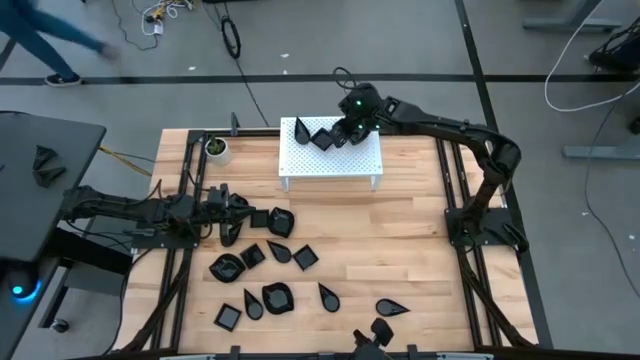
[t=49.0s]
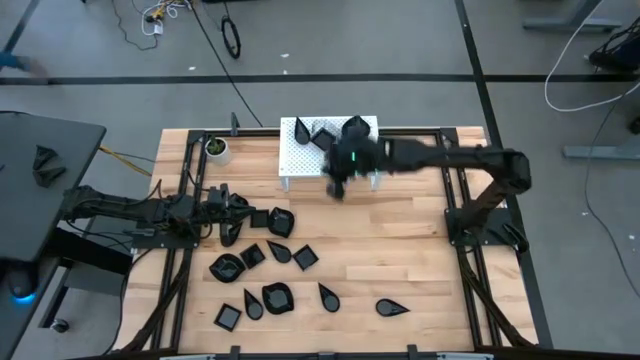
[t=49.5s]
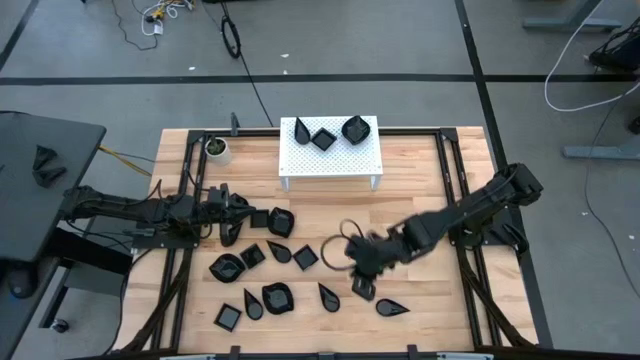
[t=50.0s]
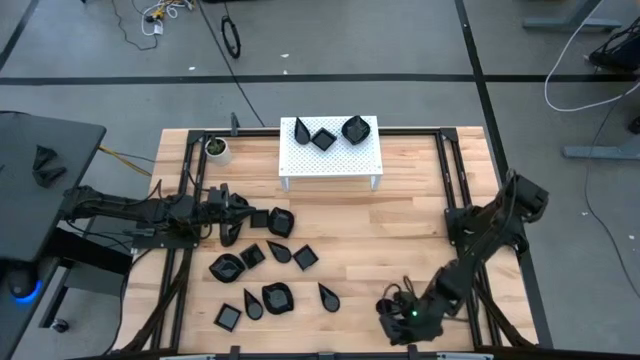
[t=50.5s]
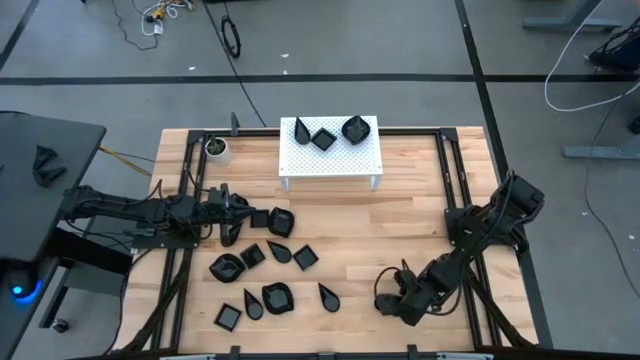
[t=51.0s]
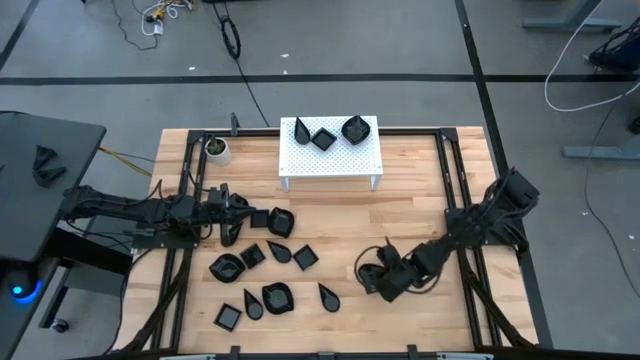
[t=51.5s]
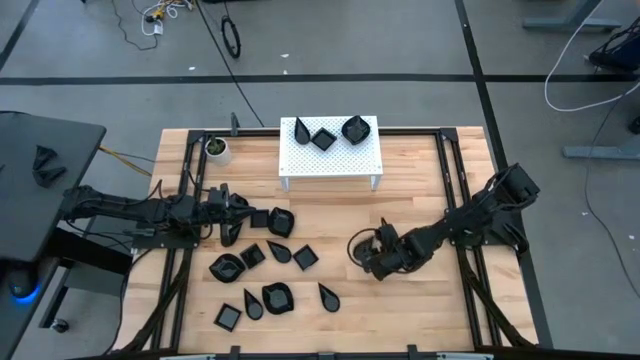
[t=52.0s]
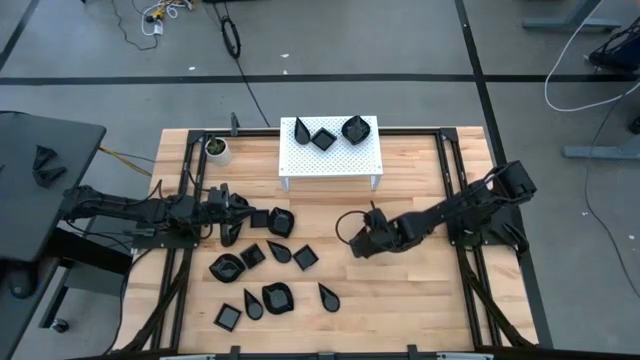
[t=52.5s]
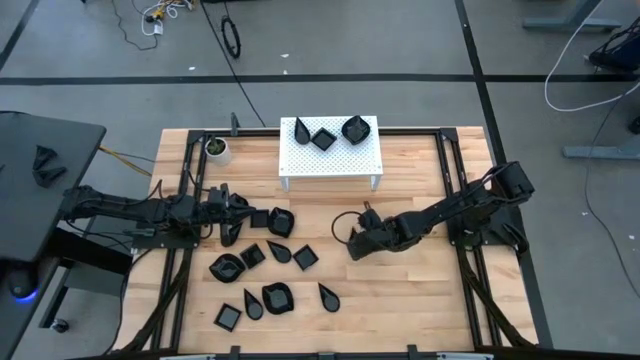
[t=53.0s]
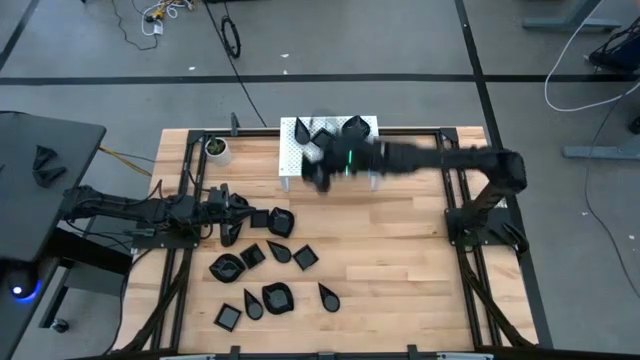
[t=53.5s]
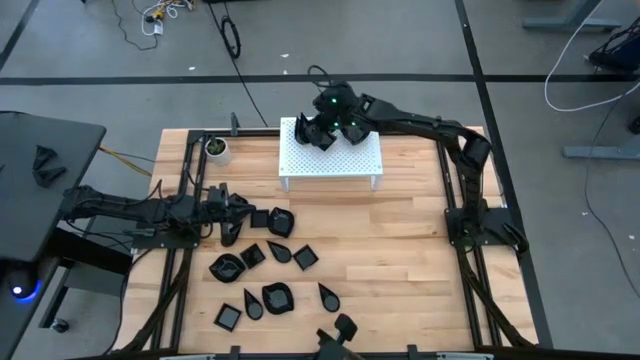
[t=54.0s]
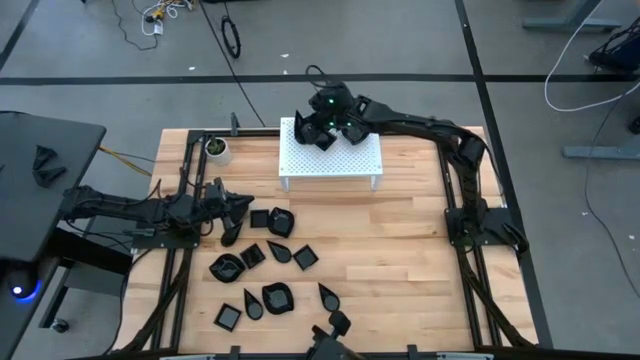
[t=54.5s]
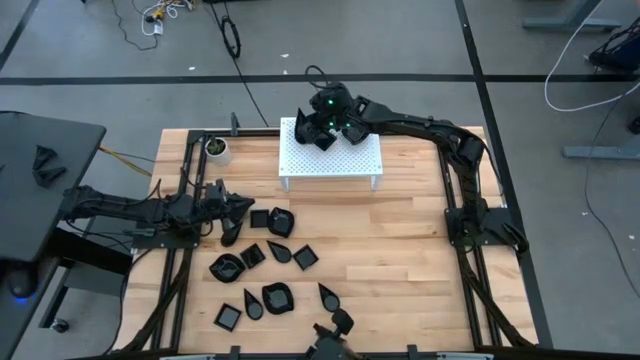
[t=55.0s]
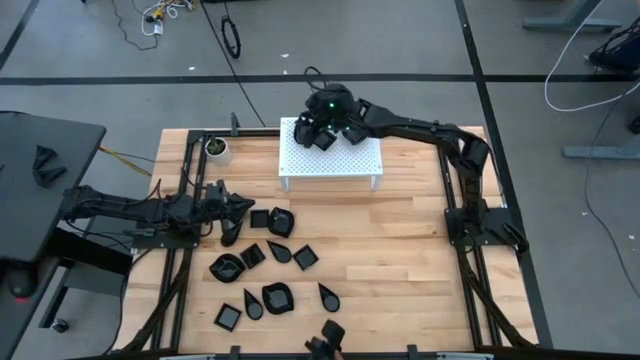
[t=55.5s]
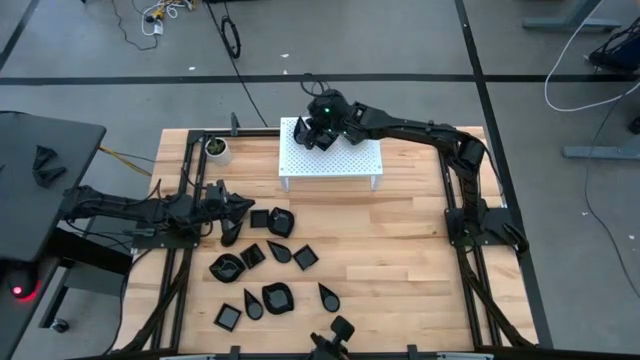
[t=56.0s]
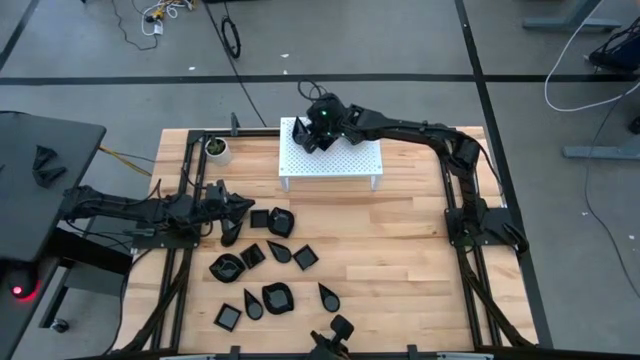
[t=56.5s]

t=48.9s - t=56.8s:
Task: Pick & Place Mini shaped plates
Stack the black drop-shaped plate on top of the other black drop-shaped plate on the shelf

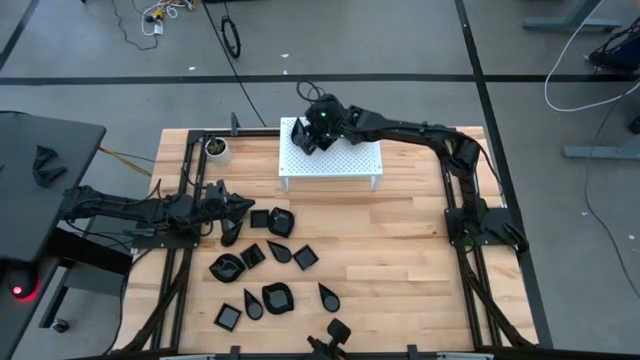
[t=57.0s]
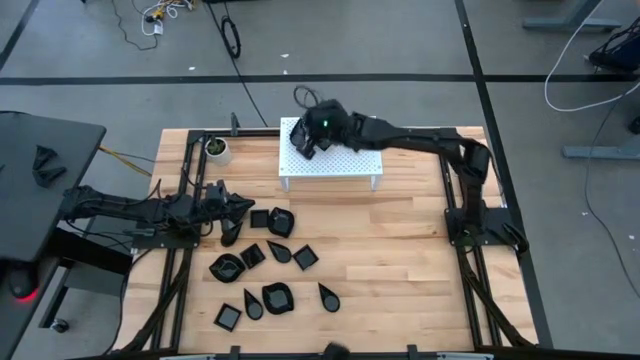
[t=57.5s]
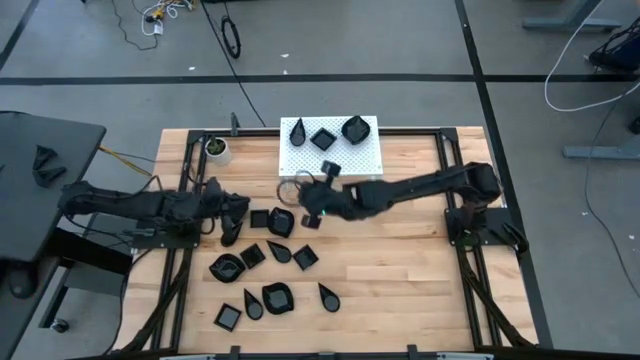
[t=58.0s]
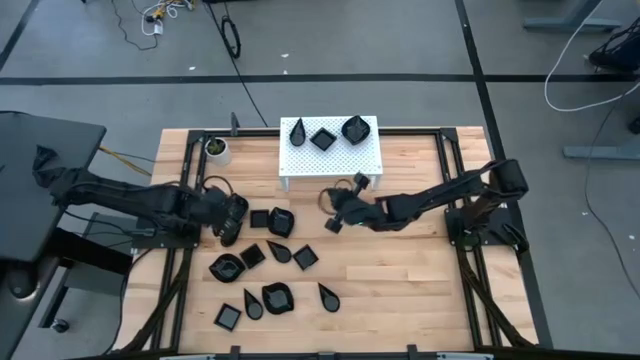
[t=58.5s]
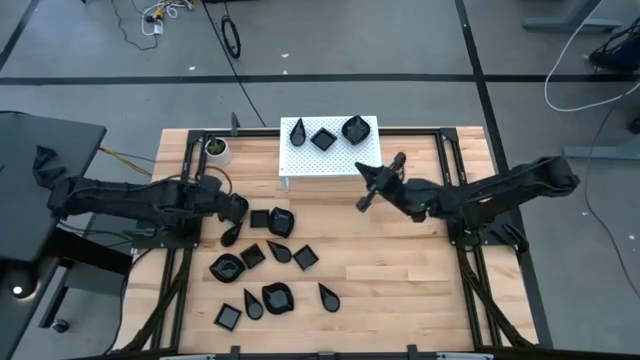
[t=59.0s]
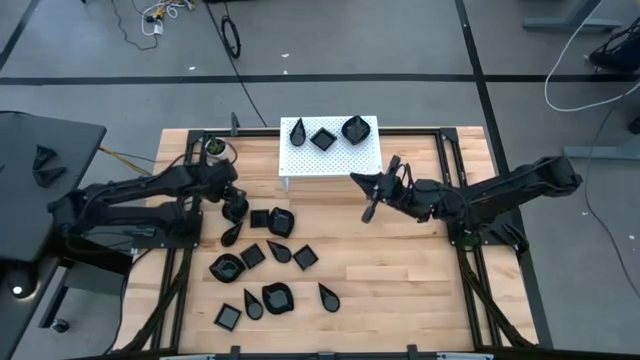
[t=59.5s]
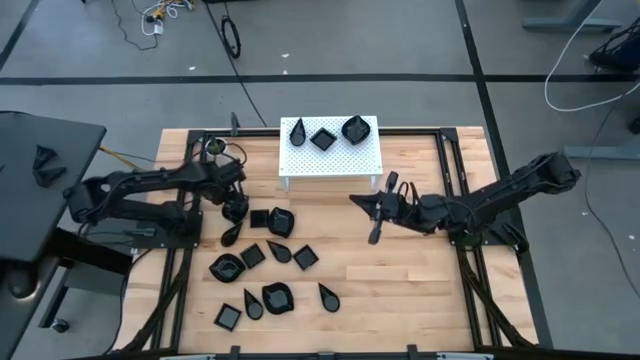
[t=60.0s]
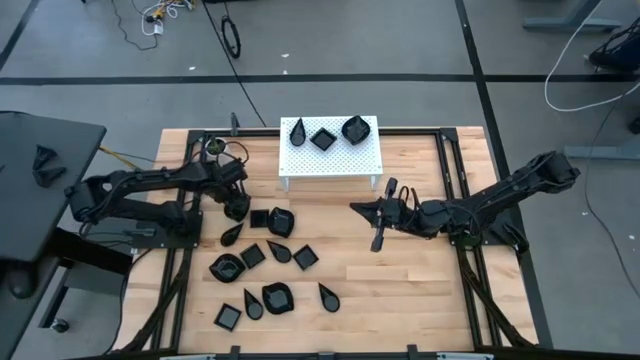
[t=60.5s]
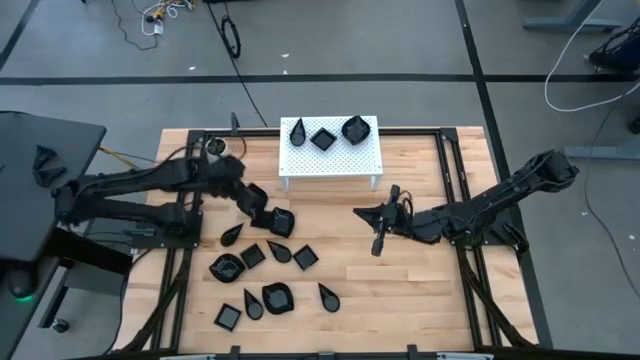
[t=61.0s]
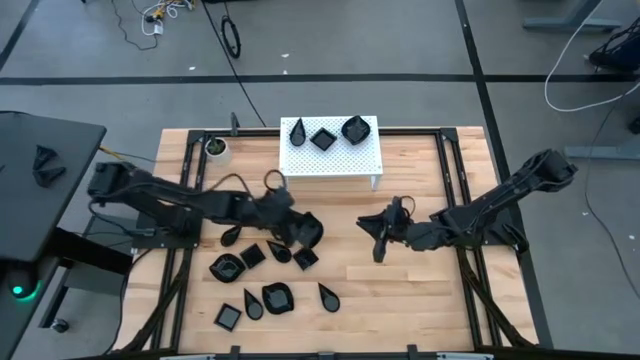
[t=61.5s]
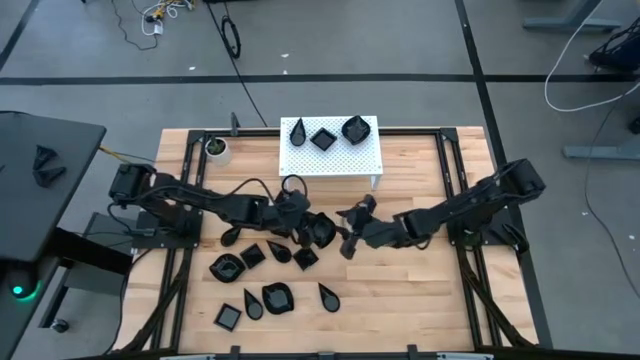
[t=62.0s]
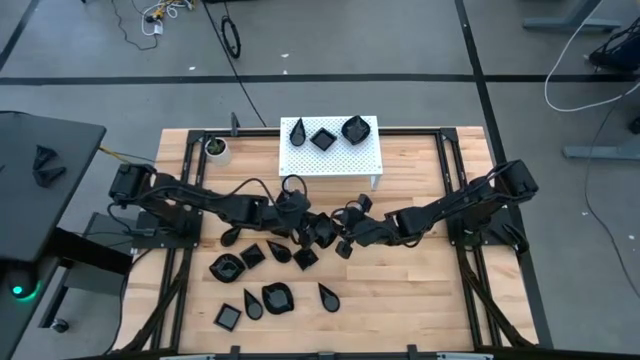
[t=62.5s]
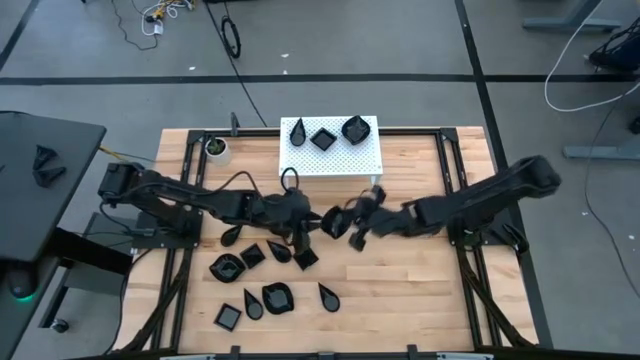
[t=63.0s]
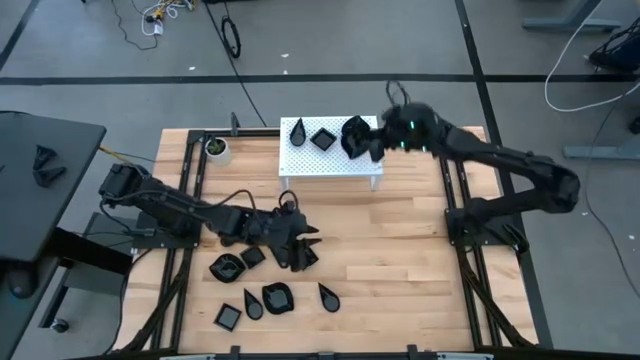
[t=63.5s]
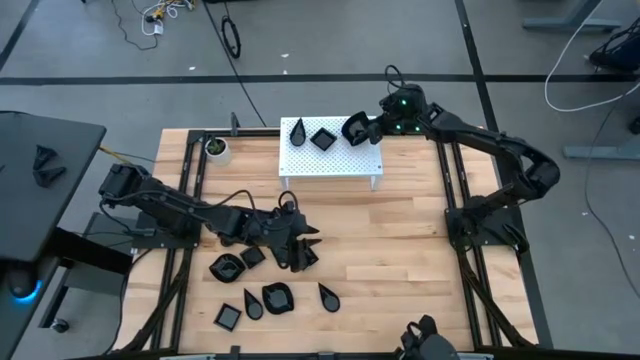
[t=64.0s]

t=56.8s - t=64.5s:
Stack the black leaf-shaped plate on top of the other black leaf-shaped plate on the shelf

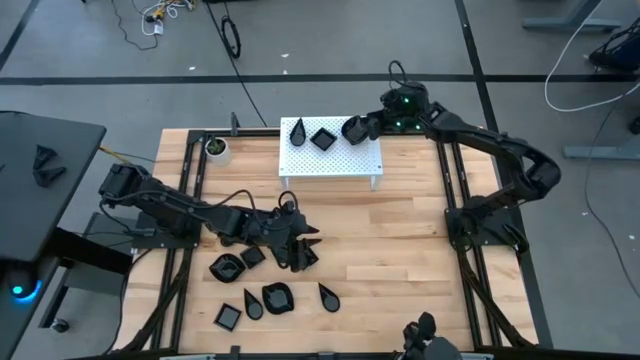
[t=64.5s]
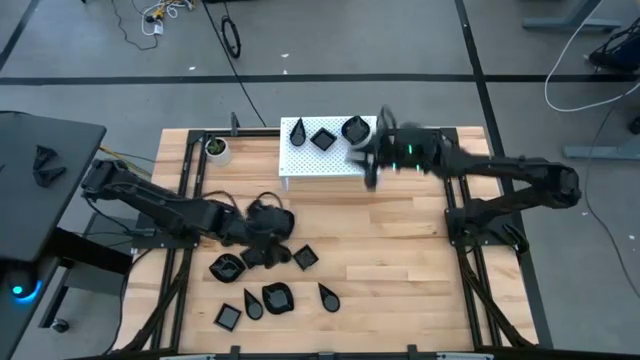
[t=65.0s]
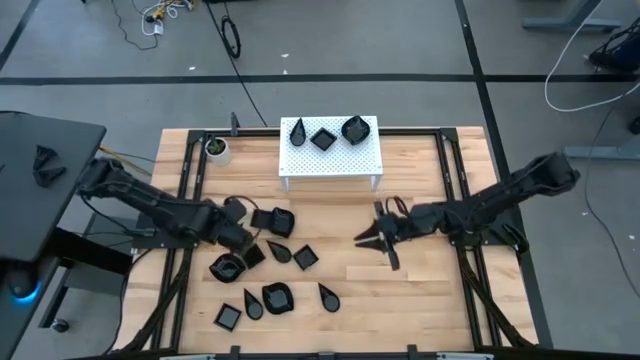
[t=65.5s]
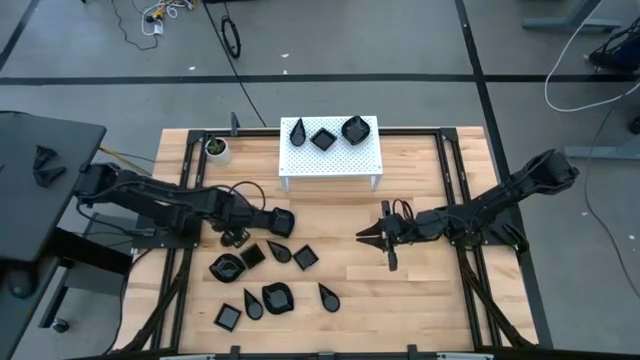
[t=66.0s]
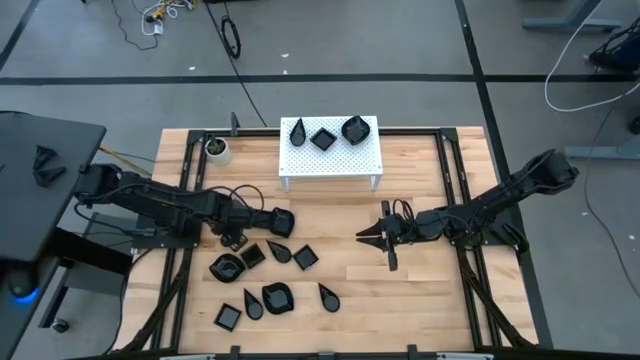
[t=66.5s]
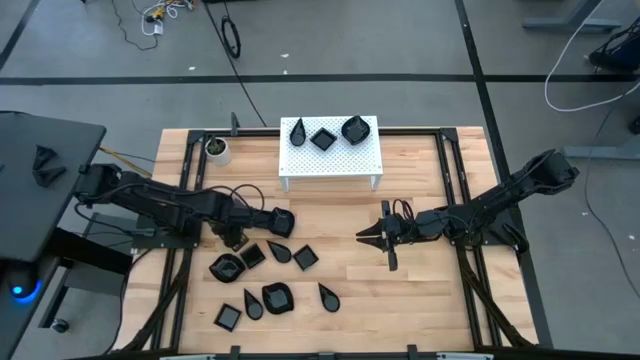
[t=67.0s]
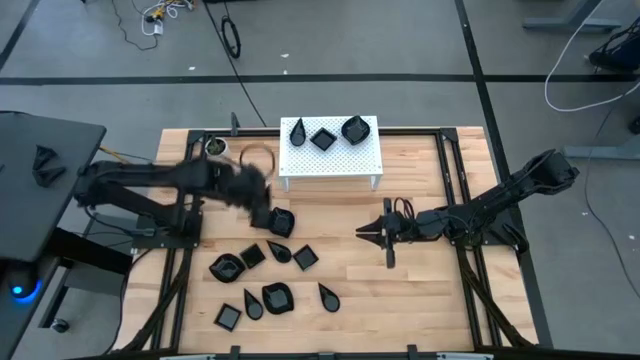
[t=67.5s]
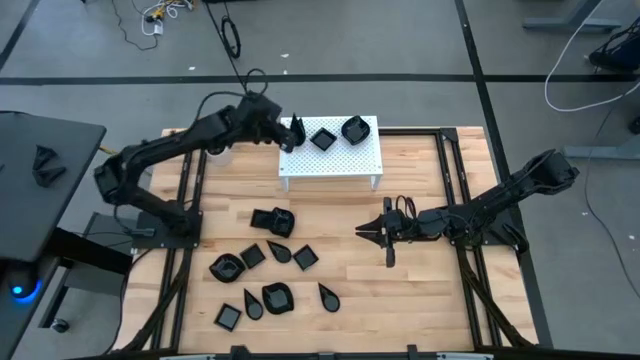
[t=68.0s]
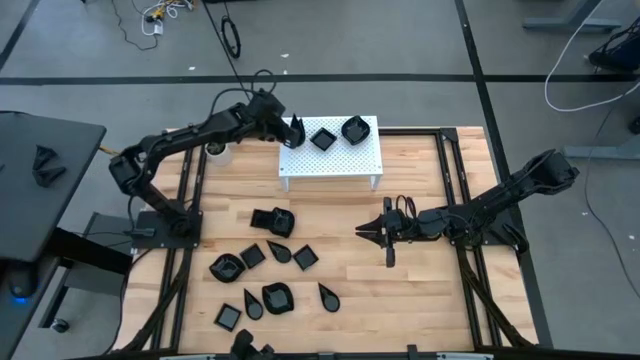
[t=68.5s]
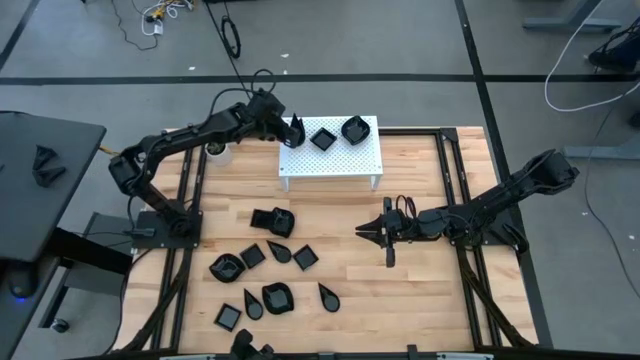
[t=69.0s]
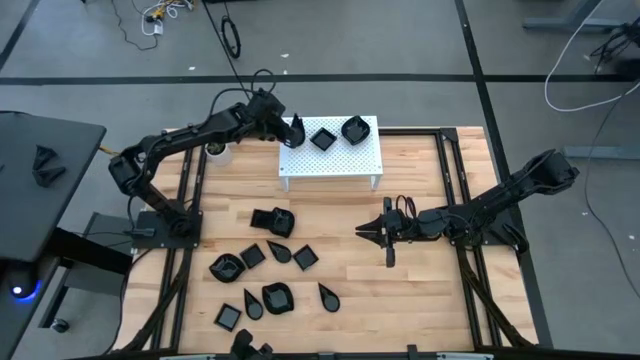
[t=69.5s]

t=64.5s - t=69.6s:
Stack the black drop-shaped plate on top of the other black drop-shaped plate on the shelf
